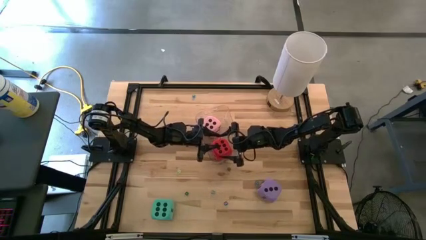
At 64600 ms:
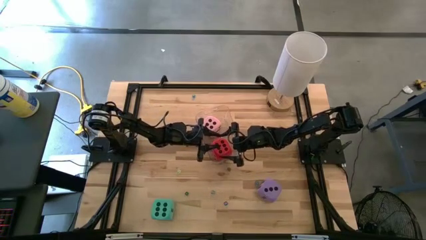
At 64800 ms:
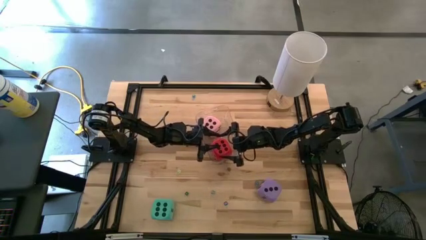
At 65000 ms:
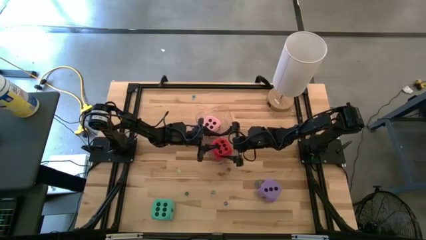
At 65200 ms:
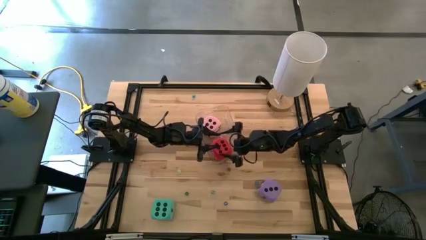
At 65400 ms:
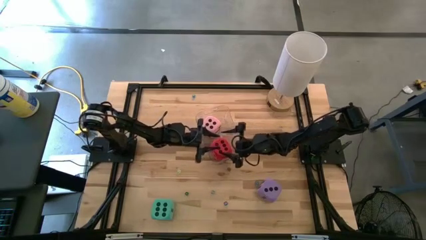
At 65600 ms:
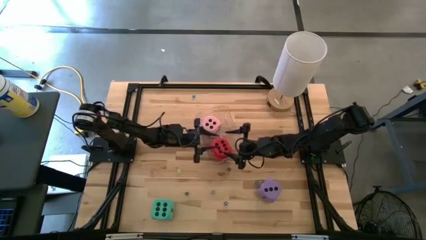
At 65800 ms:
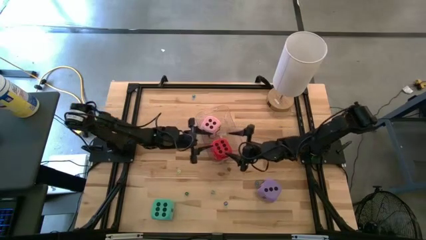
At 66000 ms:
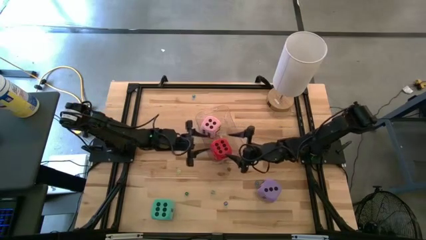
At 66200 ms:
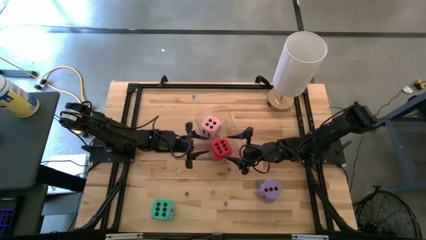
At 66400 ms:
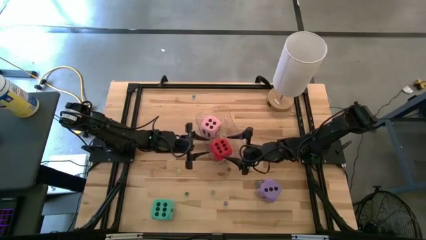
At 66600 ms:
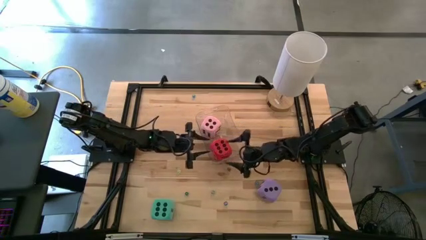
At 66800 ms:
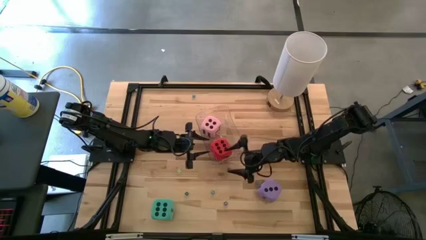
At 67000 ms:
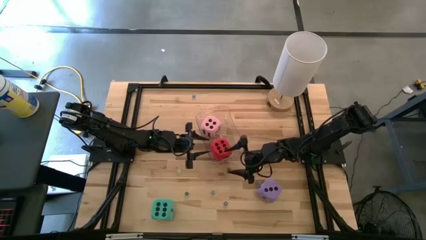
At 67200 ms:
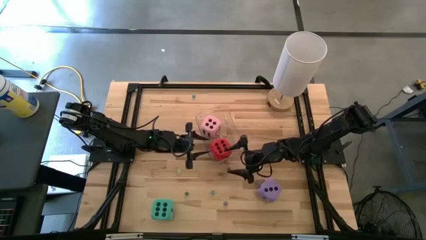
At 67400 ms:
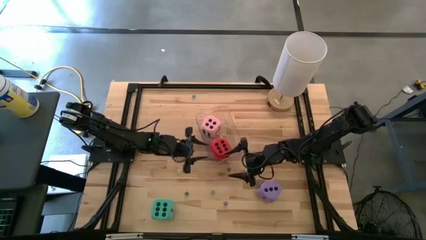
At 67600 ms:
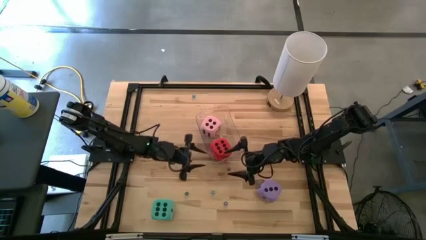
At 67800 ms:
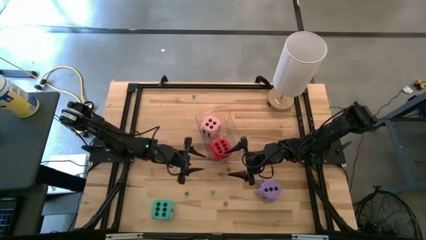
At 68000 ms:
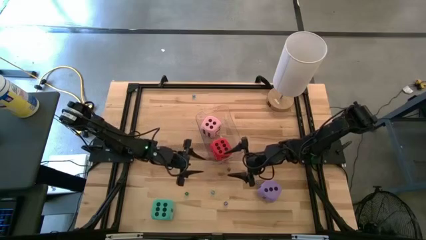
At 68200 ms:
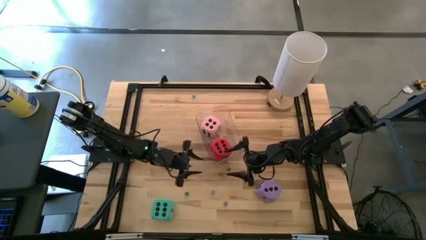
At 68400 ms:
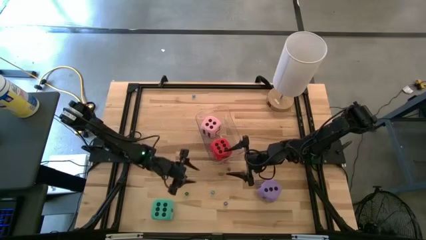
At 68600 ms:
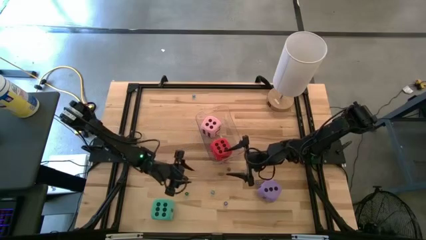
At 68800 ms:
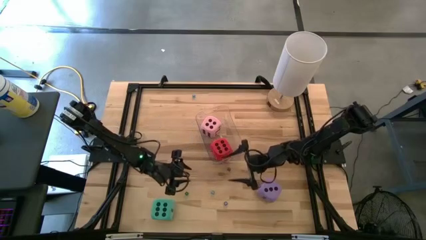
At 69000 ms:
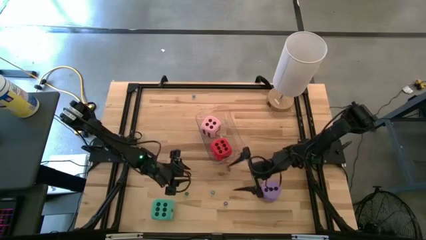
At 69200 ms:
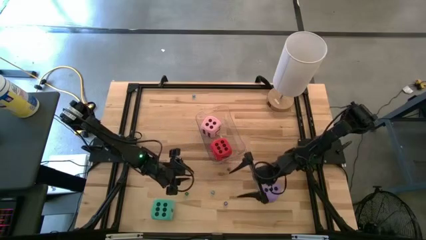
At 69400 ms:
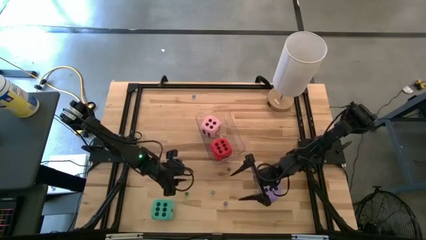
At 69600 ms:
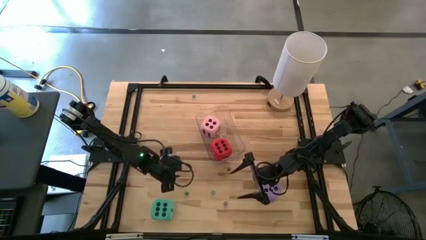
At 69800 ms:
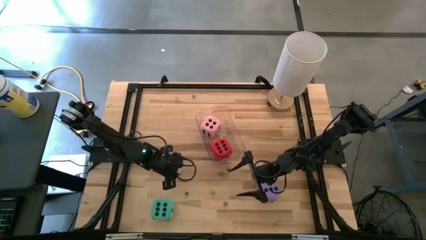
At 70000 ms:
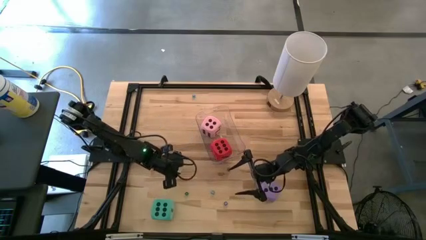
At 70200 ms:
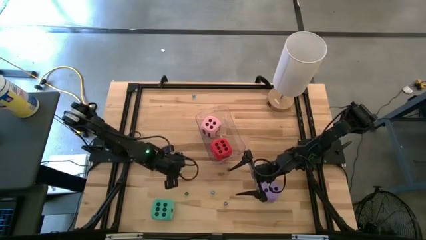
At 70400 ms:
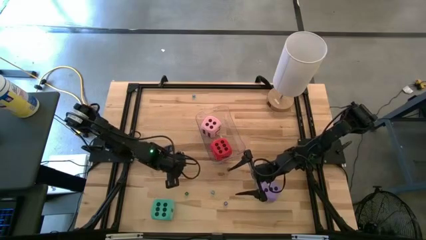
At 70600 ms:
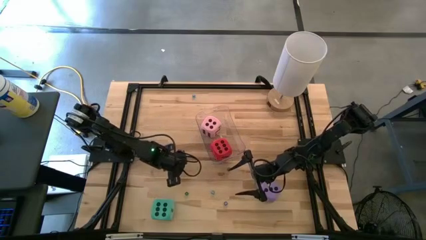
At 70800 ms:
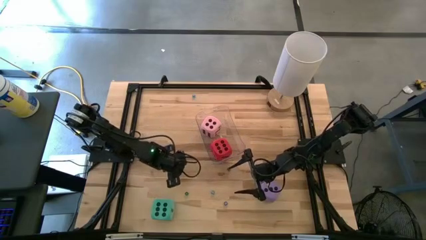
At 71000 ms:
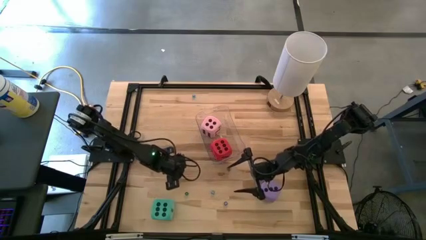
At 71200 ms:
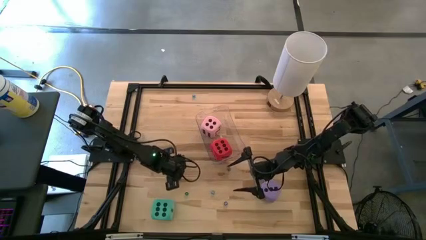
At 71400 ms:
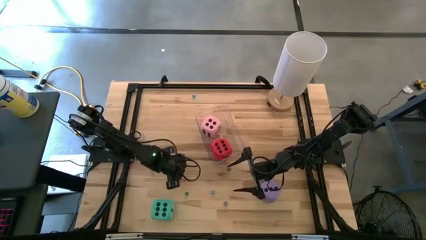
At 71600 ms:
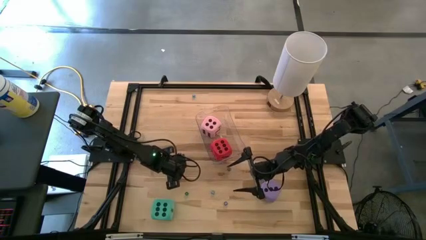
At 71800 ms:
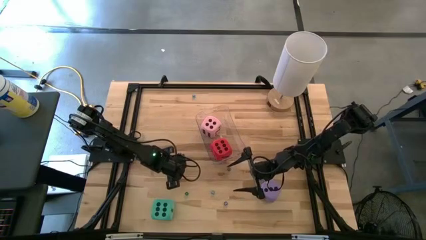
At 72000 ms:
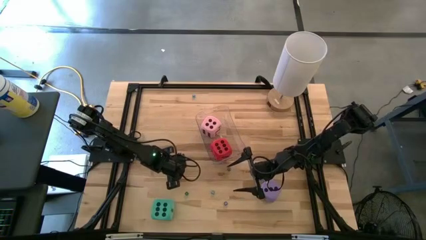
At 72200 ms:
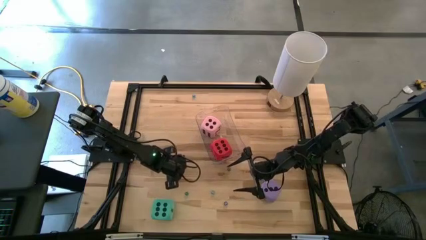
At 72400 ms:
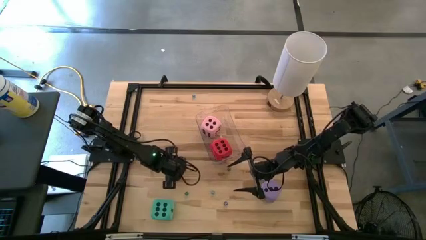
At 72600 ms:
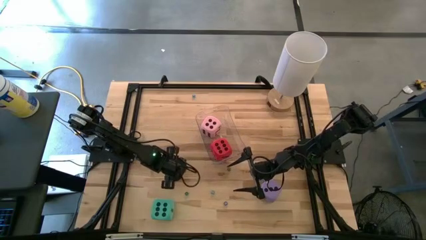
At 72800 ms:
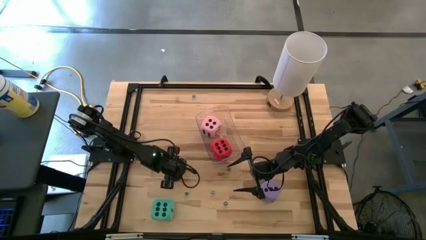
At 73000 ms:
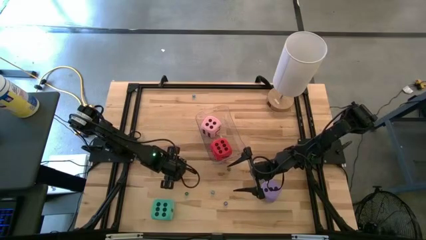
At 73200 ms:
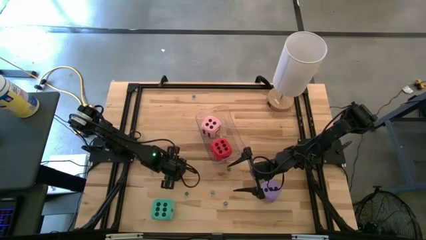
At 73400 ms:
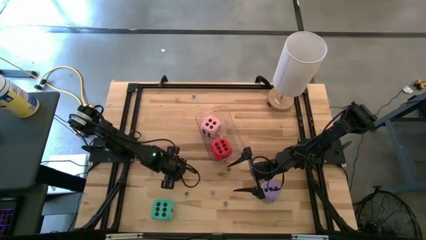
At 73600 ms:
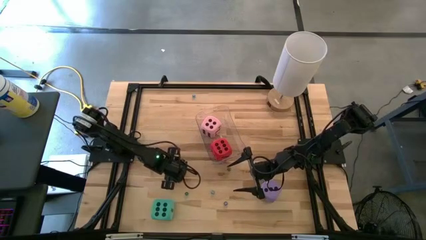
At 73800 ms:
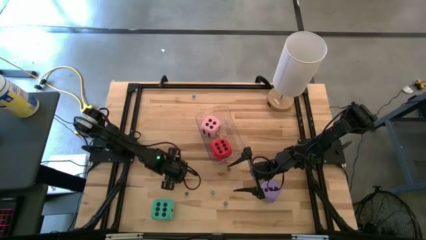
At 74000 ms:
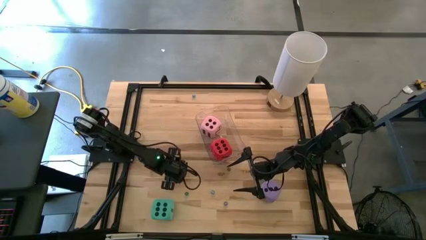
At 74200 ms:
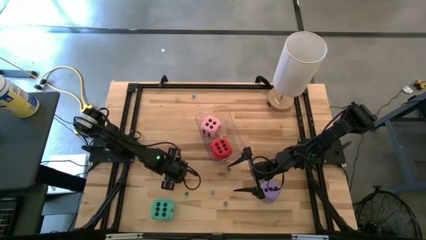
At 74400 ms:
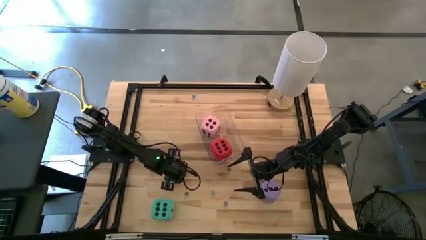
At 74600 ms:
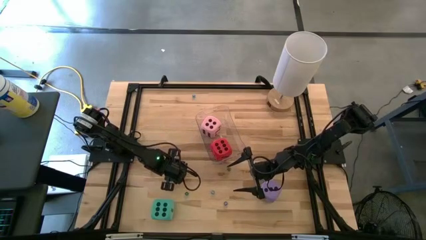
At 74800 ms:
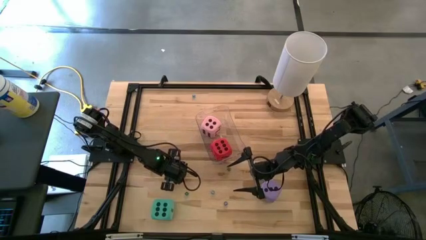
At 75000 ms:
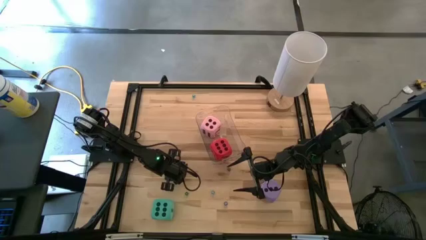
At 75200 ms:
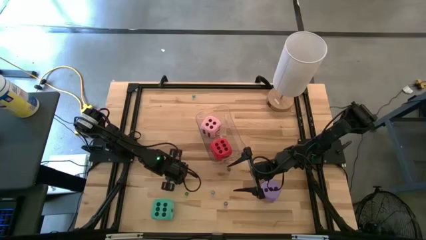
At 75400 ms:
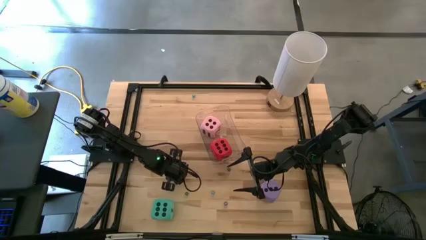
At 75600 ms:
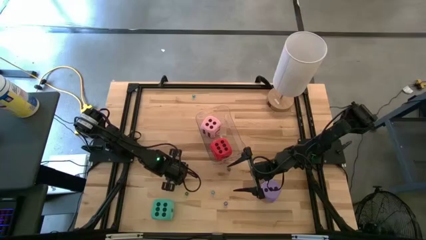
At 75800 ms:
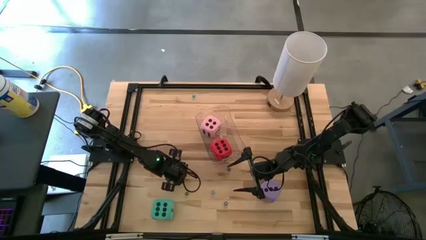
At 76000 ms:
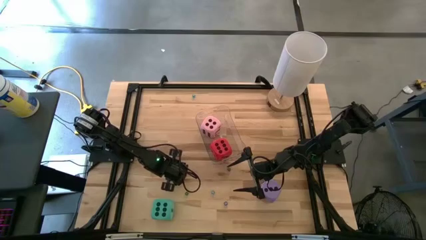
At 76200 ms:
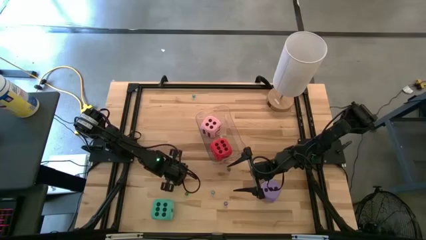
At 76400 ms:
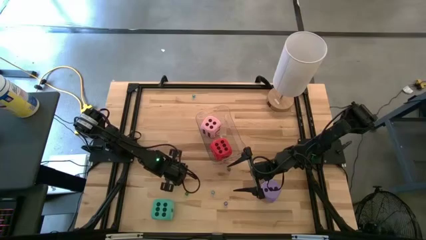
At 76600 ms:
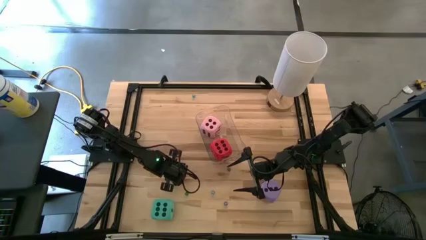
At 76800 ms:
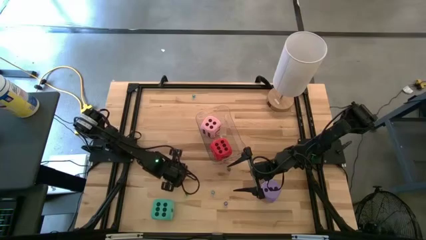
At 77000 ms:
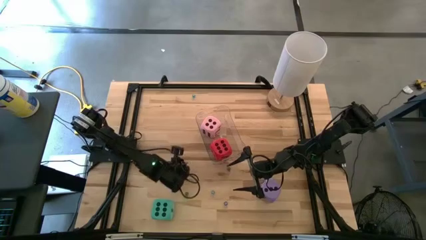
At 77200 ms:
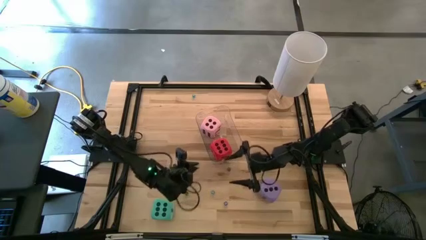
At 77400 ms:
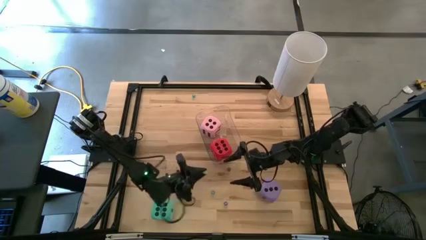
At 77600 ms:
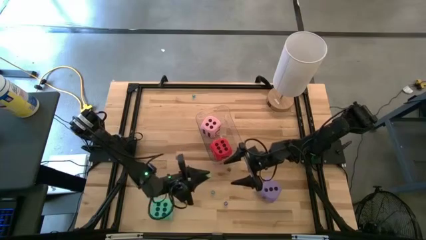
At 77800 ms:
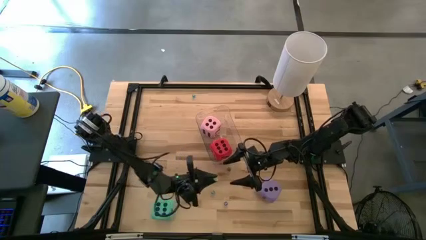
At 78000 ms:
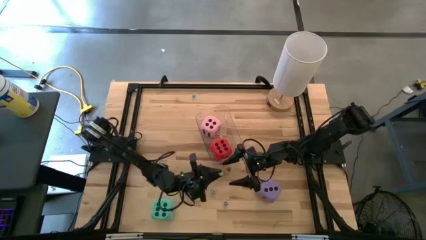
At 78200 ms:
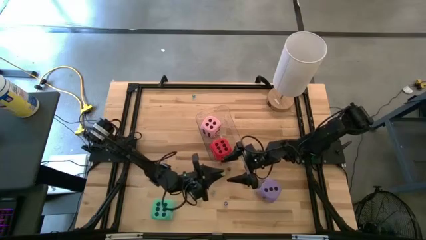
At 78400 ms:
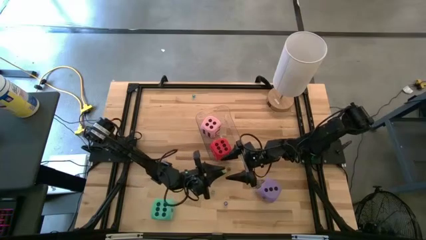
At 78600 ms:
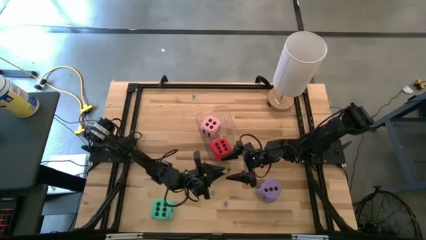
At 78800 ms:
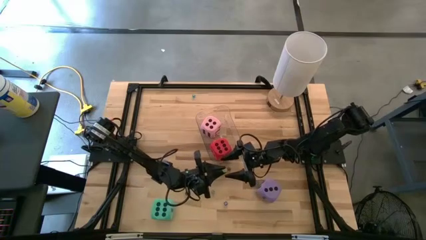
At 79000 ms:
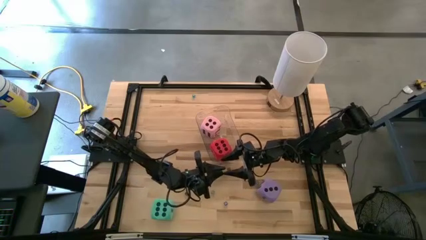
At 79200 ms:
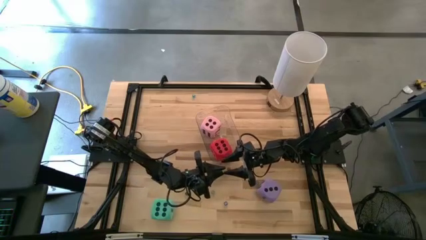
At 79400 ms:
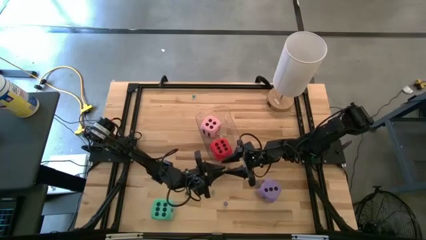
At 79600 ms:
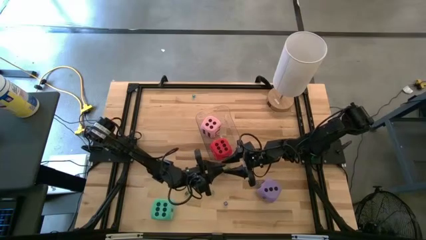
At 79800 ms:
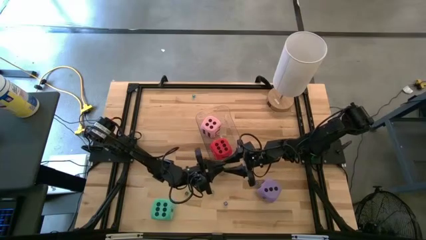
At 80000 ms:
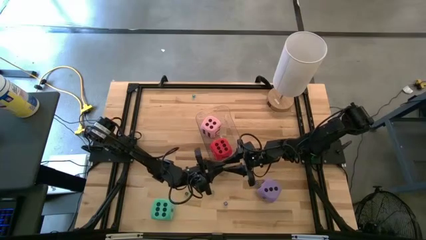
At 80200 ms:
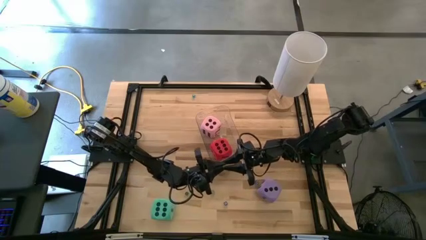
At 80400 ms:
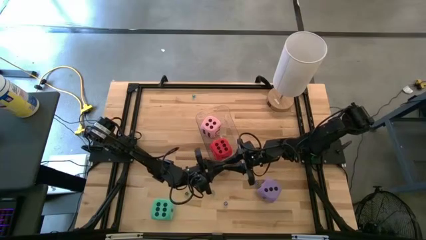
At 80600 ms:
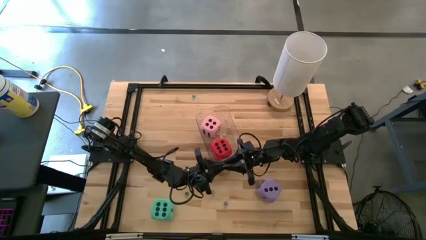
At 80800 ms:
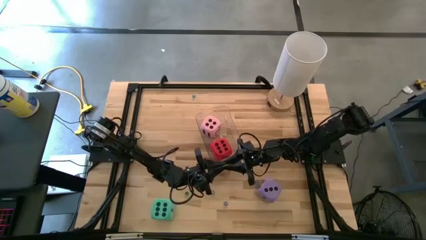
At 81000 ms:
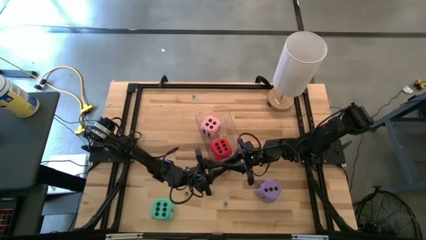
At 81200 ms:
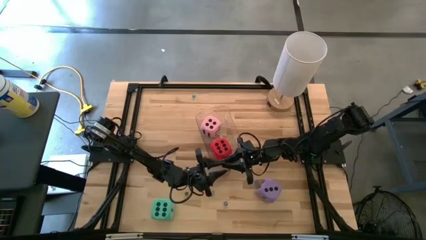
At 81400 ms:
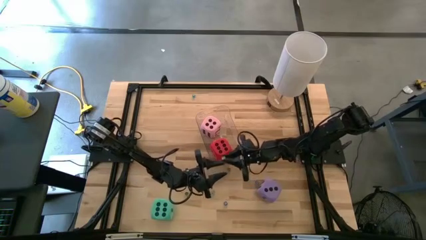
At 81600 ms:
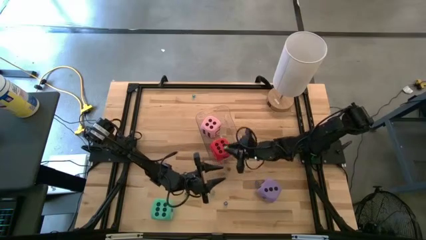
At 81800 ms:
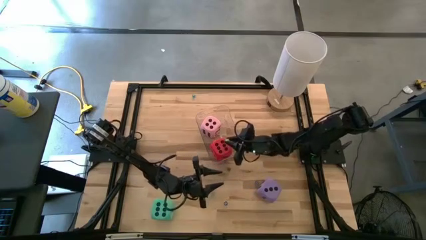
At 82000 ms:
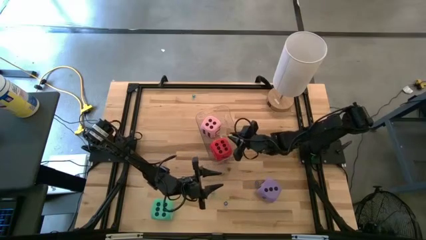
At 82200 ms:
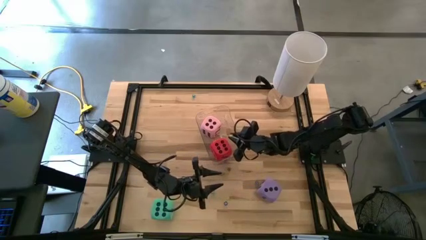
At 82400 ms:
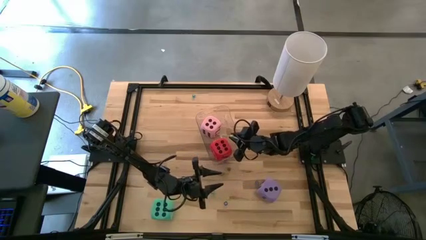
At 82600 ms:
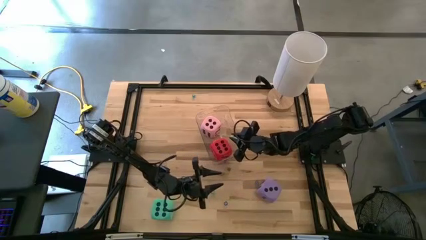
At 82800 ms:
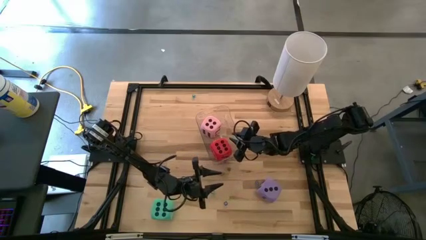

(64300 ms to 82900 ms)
Task: Pick & Place Dice
Put the small green dice into the transparent bin
